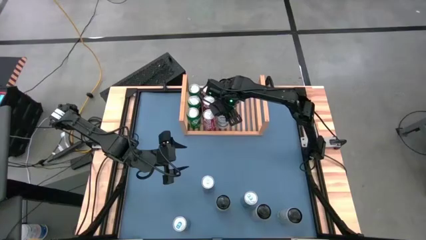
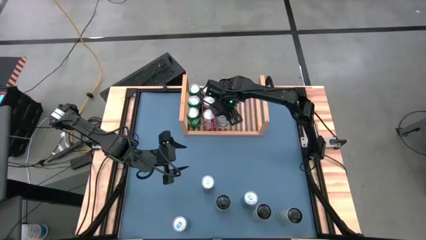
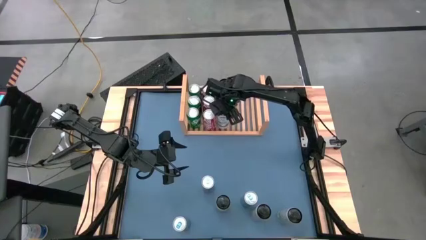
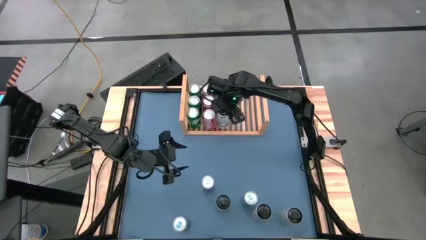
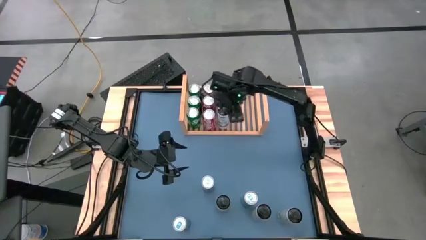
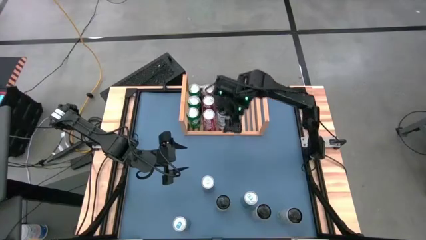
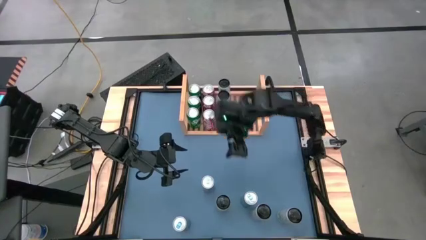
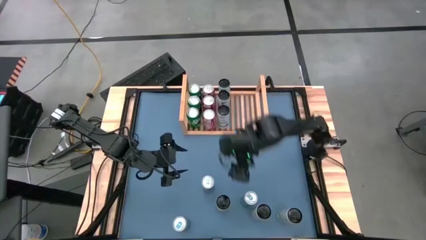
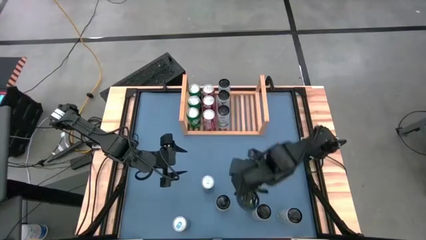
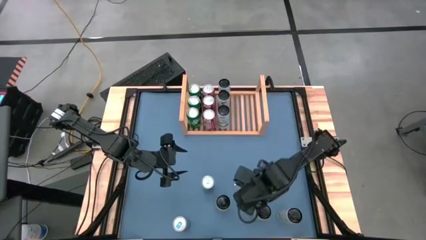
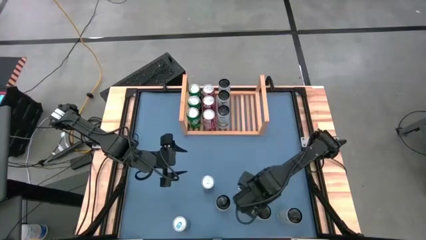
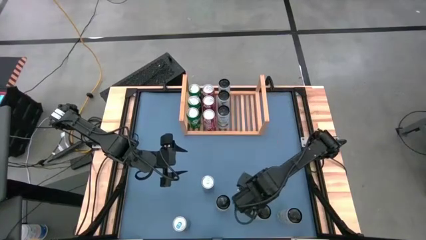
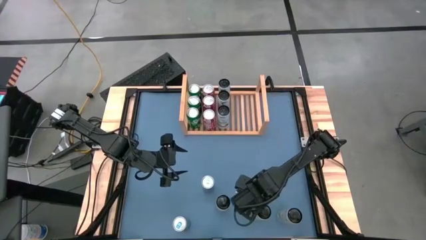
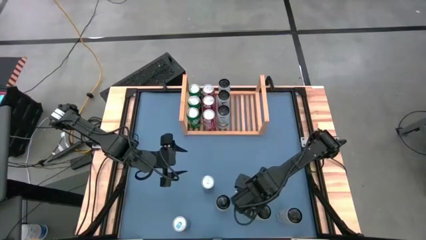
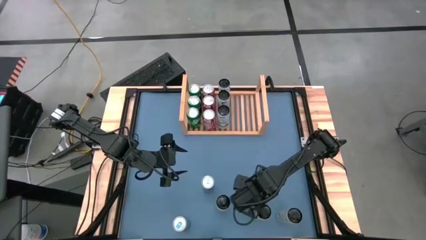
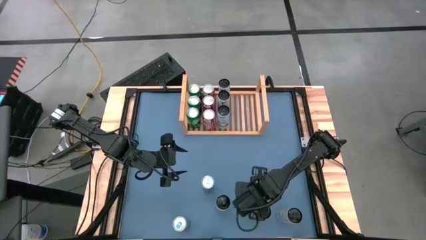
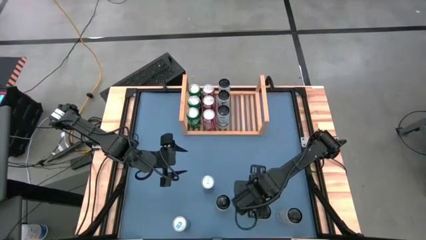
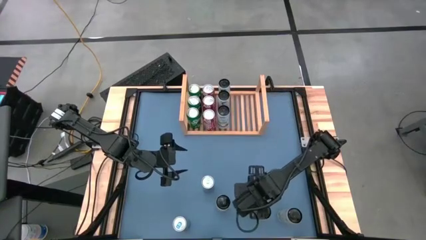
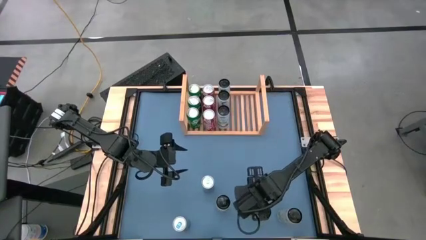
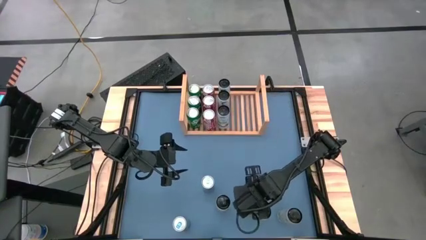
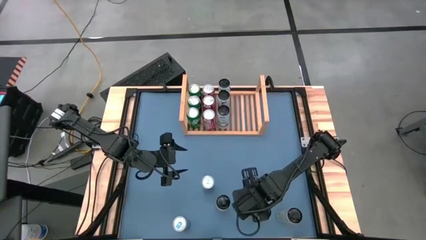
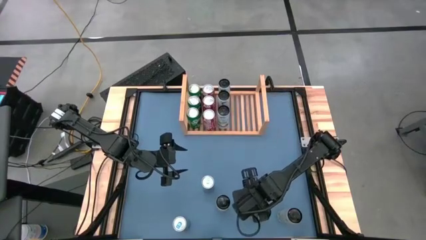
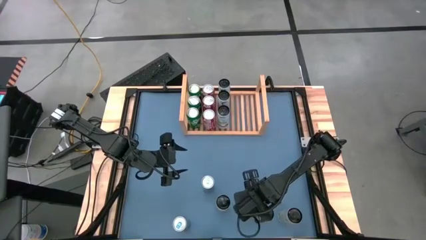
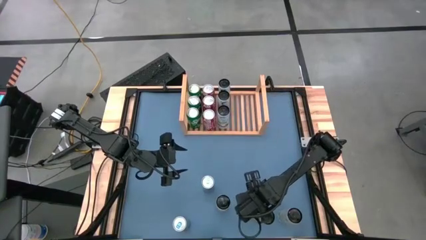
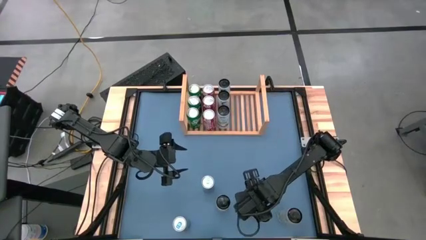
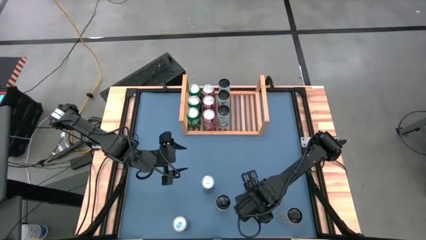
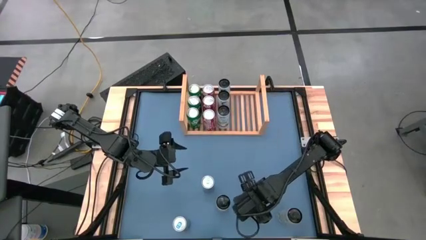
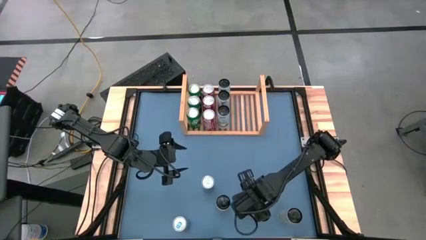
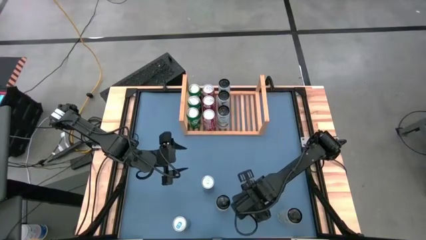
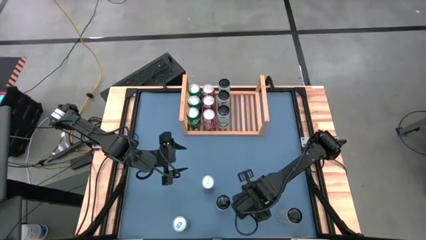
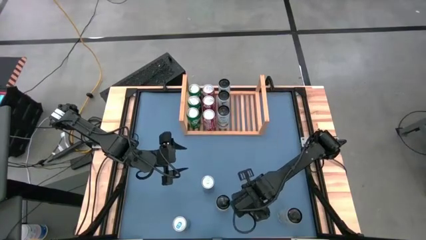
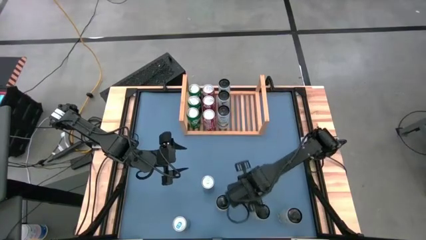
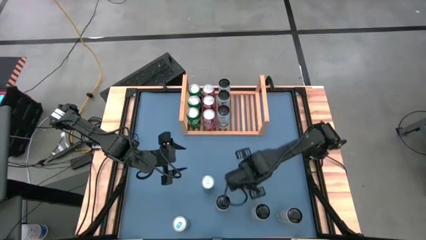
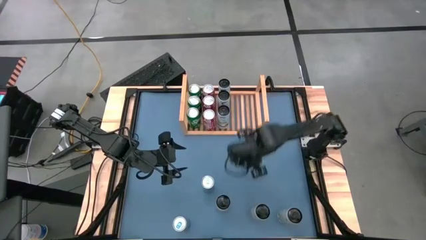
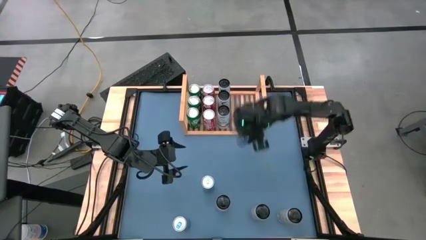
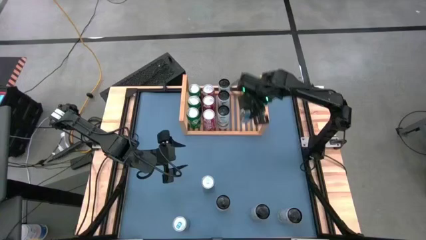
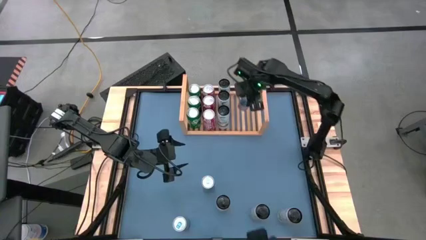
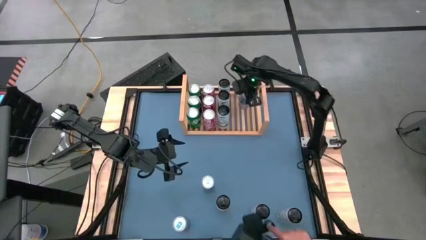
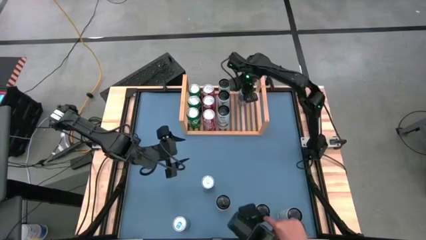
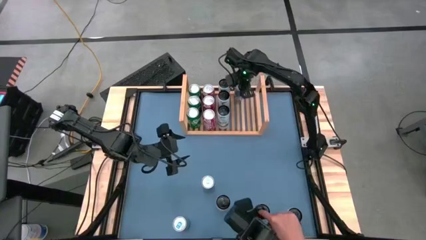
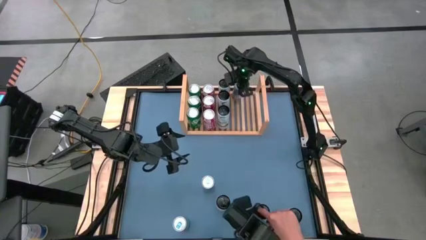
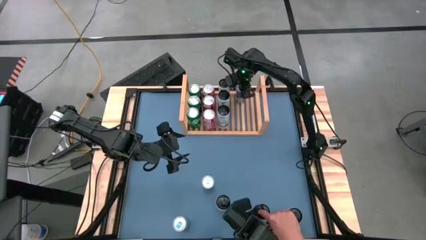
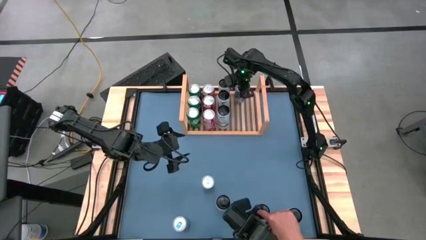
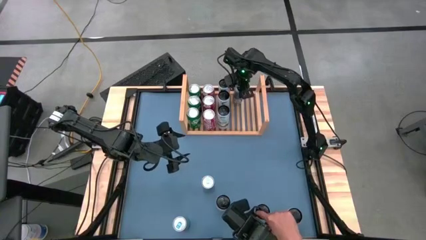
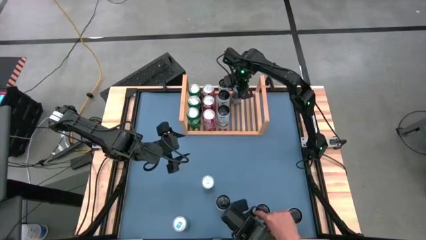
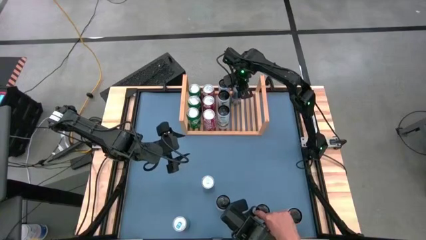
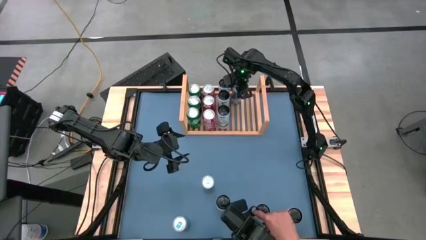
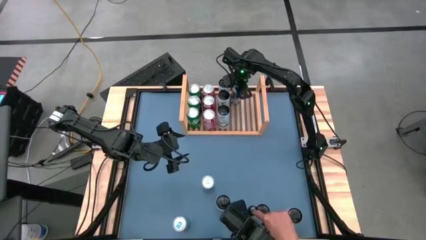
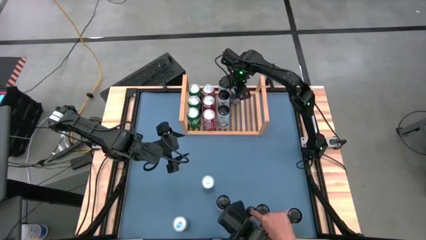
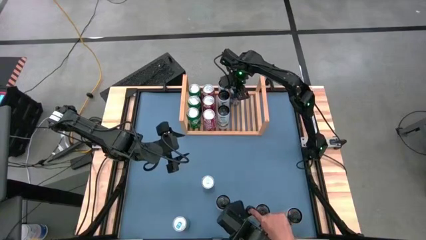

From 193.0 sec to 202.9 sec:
Task: Place canned beverage on shelf
Put the blue soda can on the shelf

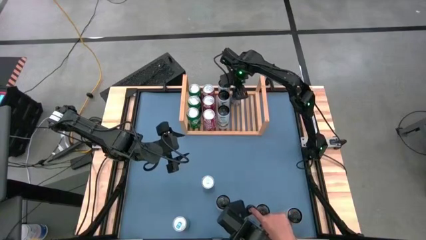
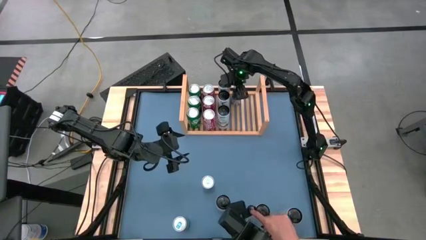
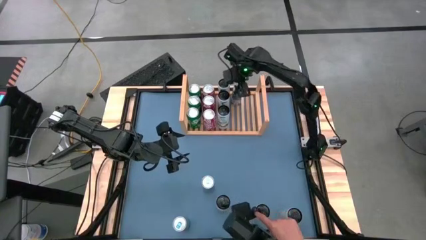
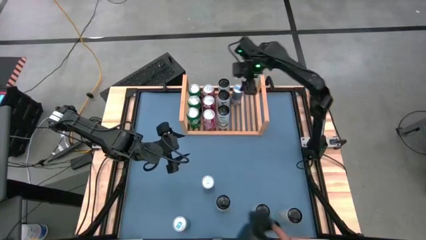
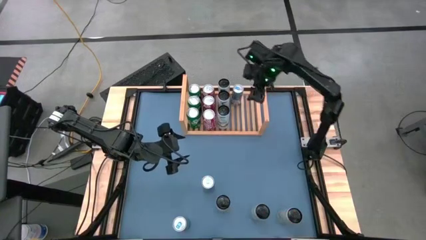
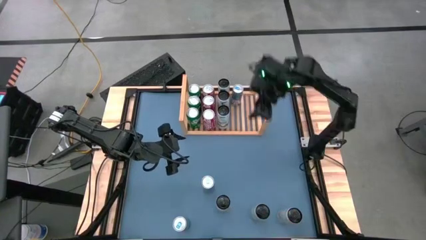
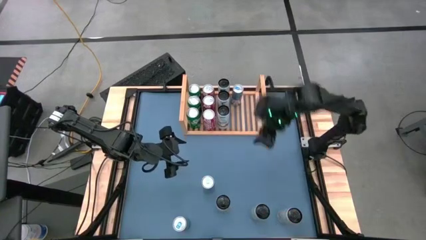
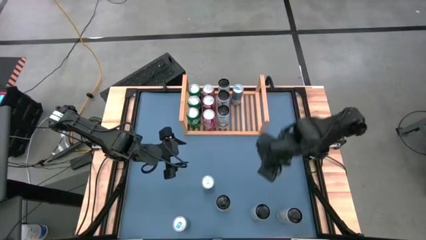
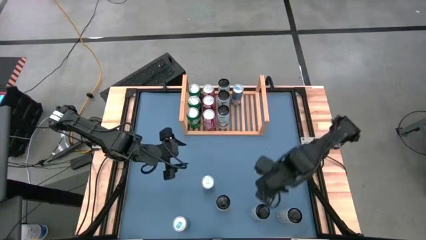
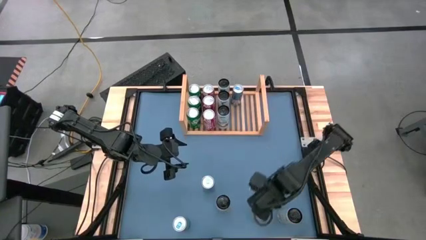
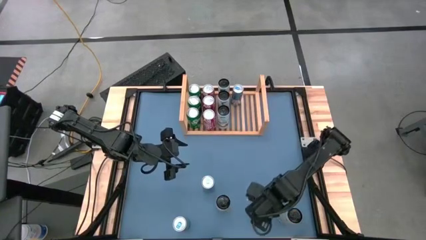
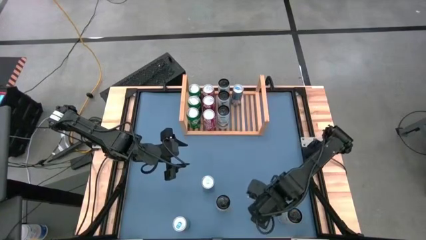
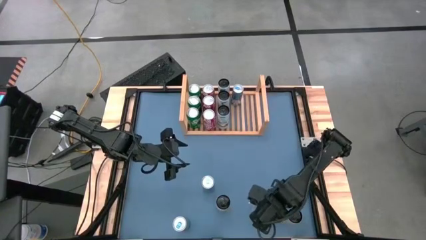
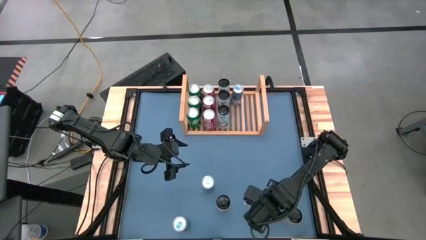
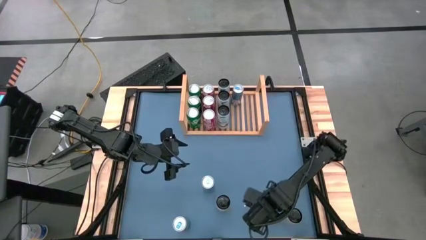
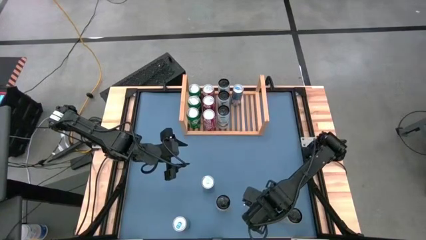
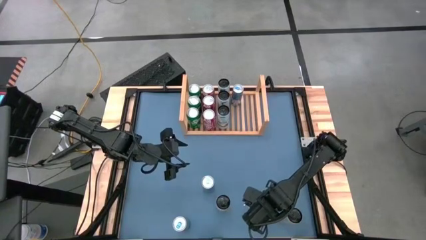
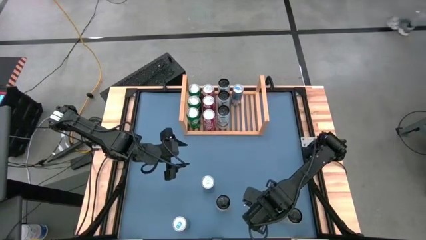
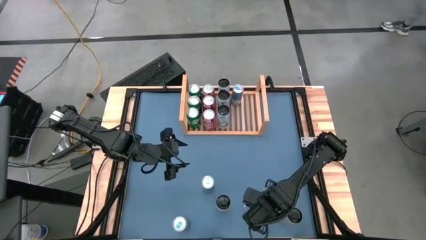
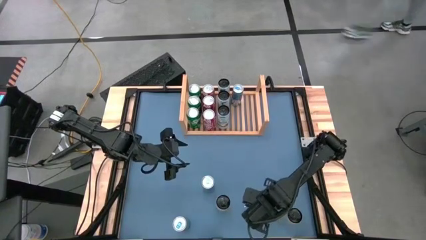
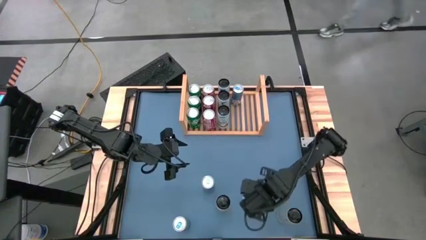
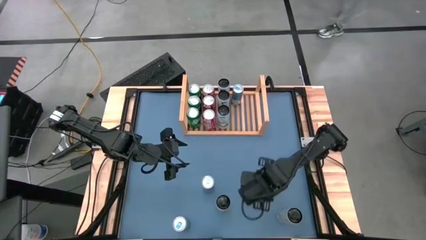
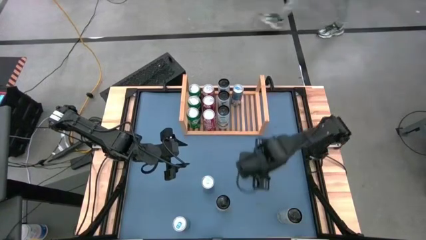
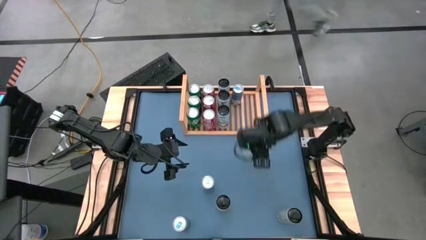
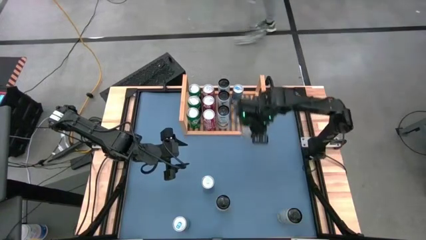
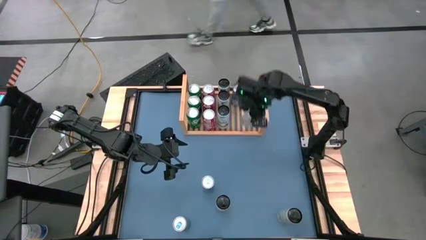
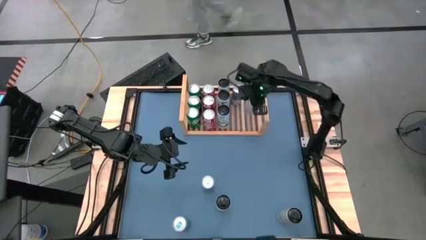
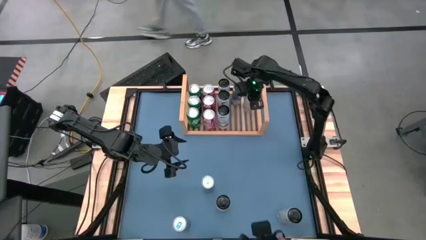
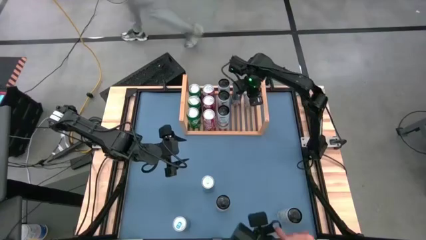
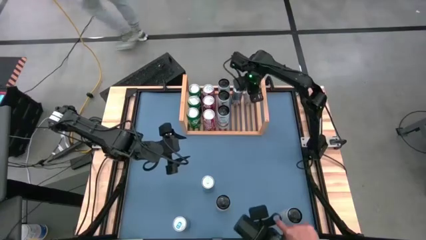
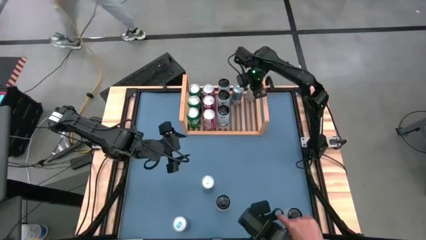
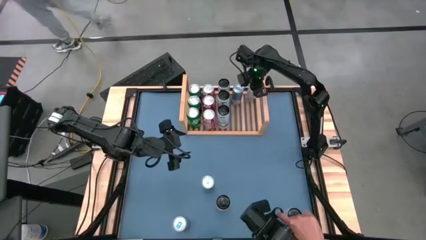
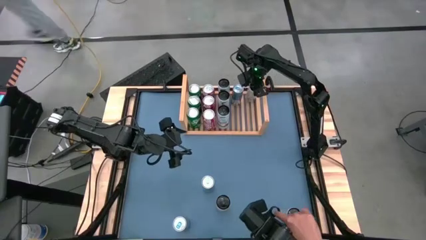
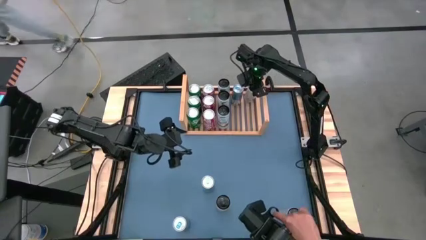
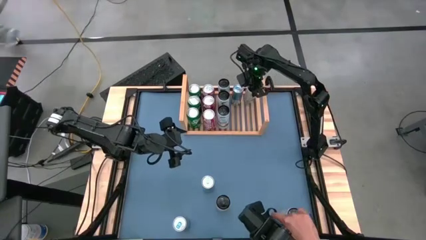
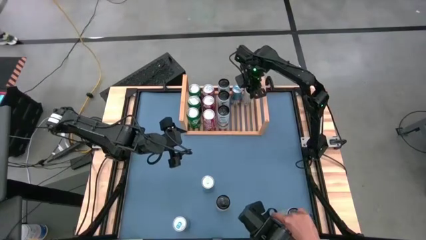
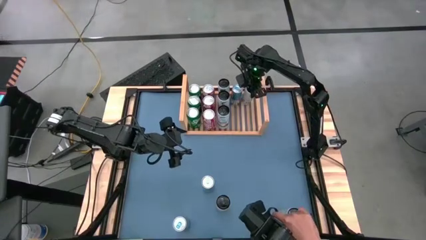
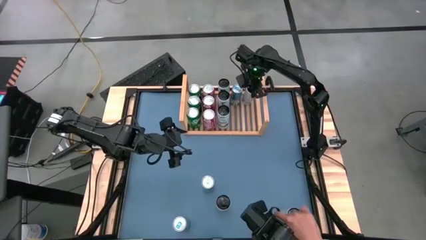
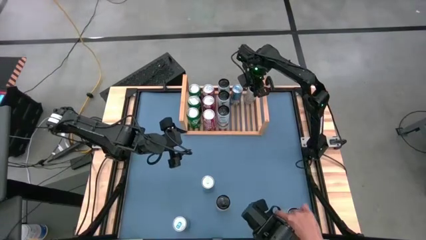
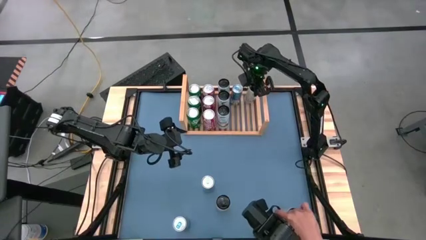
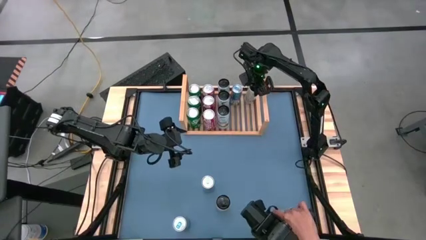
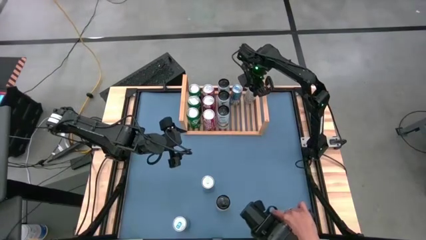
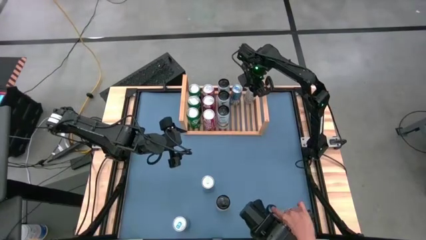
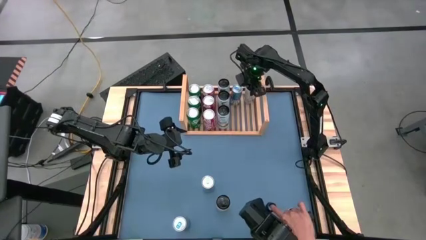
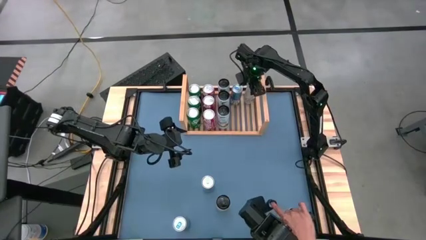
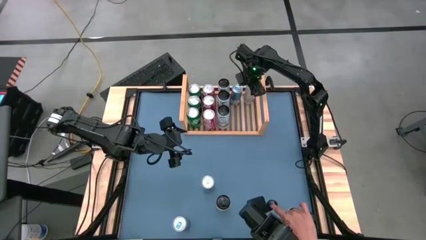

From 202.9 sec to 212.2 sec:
Put the bottom right white-yellow soda can on the shelf
